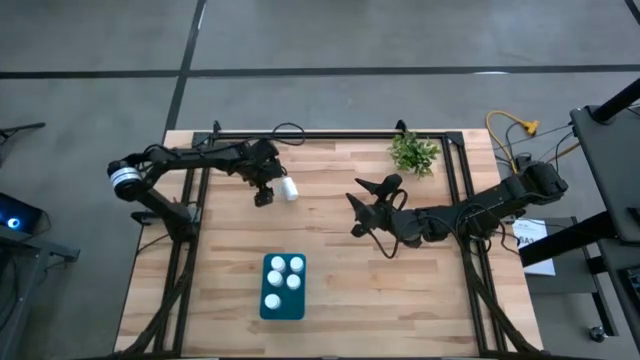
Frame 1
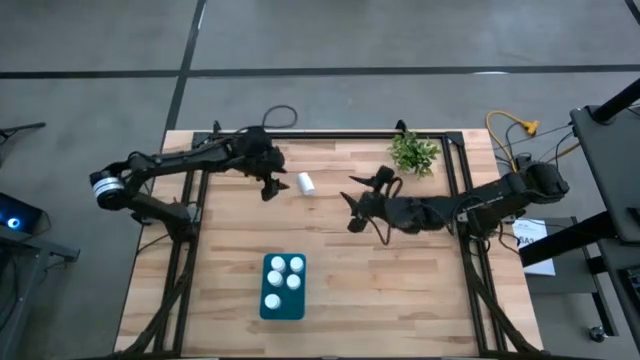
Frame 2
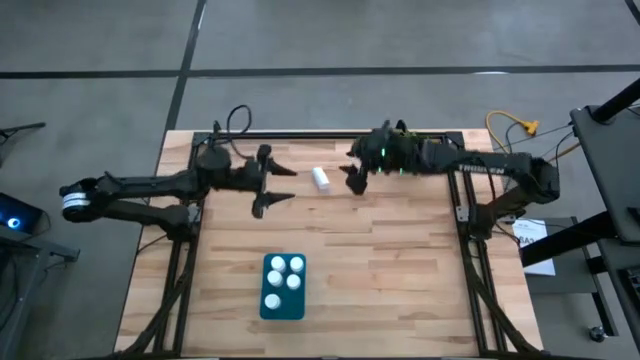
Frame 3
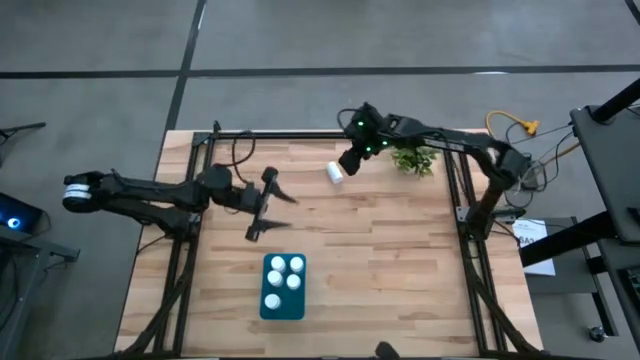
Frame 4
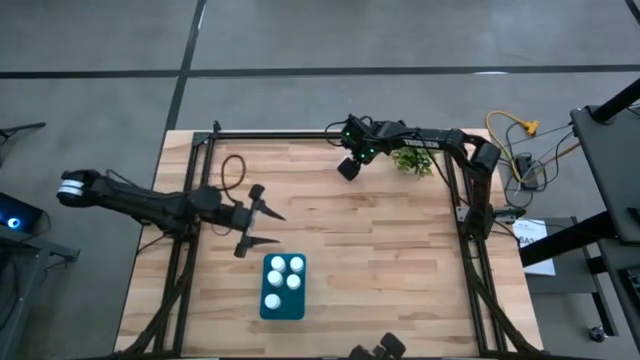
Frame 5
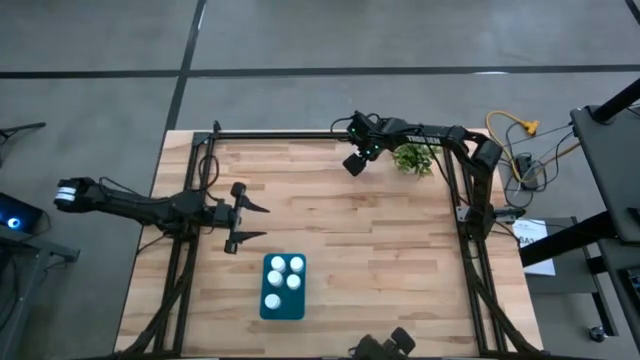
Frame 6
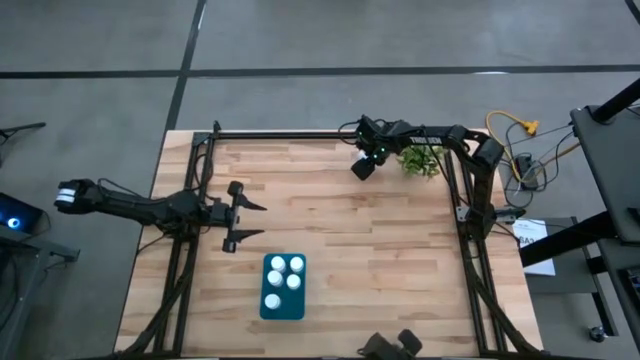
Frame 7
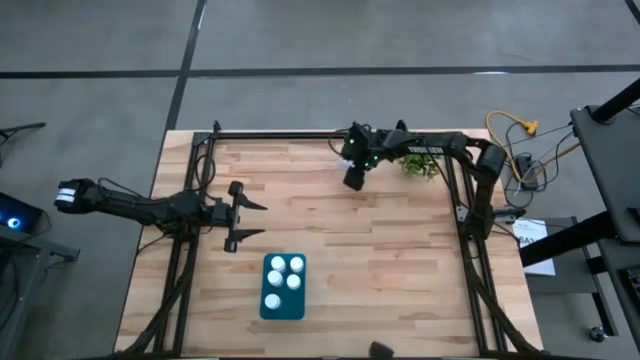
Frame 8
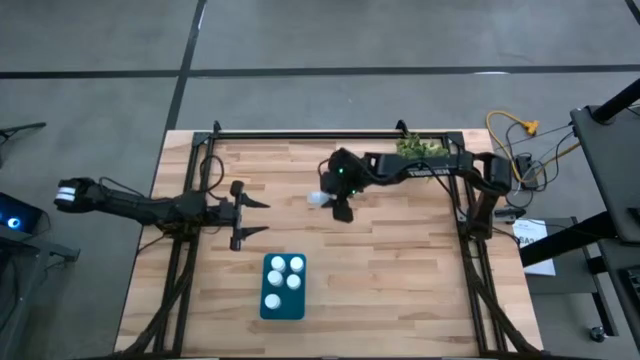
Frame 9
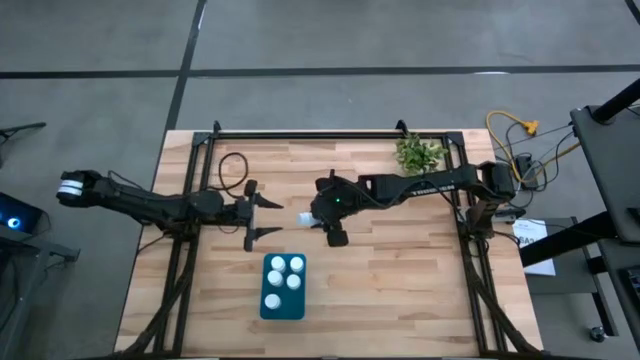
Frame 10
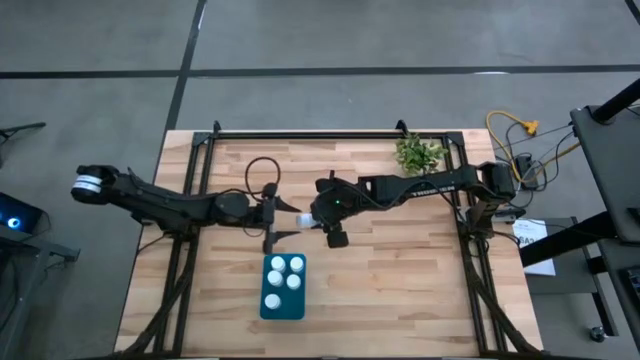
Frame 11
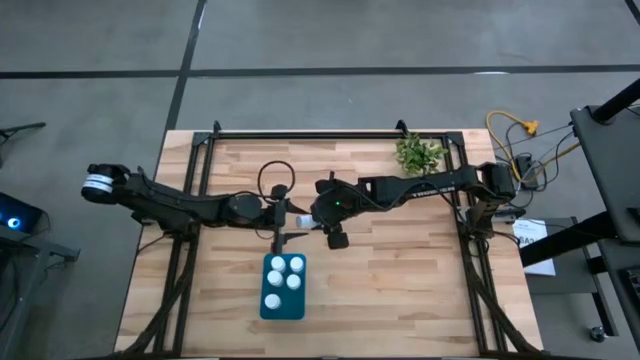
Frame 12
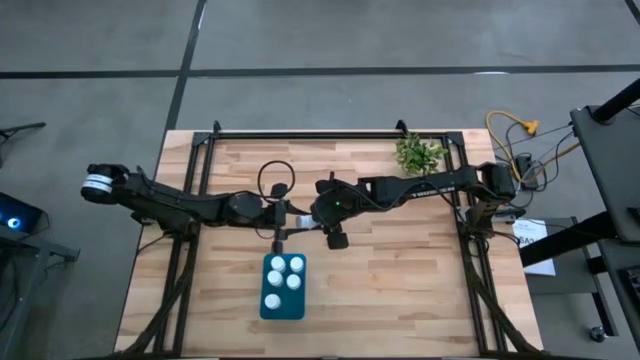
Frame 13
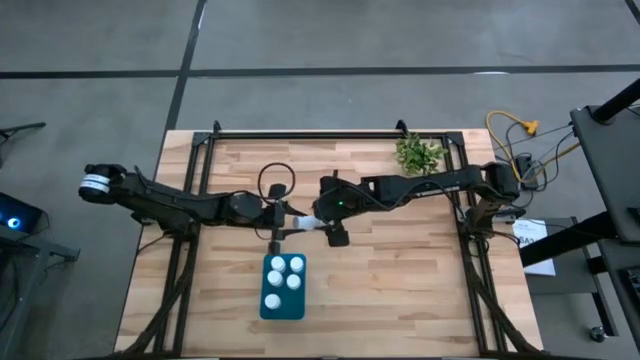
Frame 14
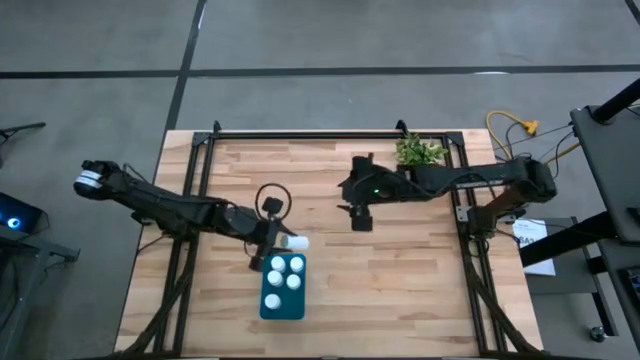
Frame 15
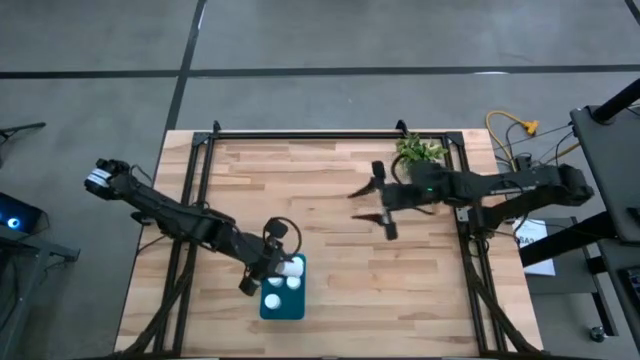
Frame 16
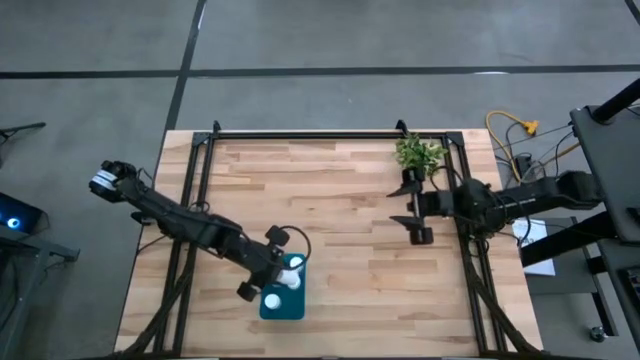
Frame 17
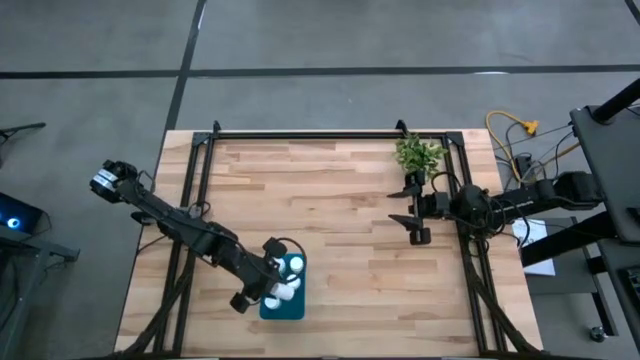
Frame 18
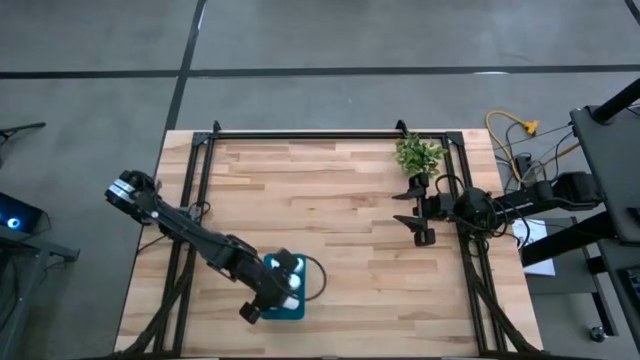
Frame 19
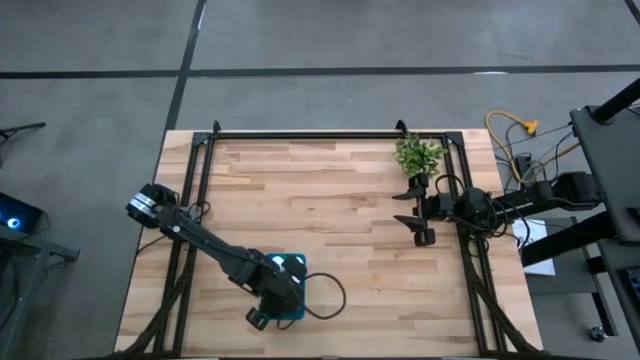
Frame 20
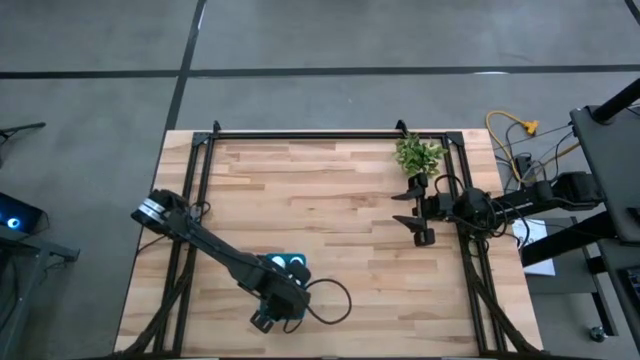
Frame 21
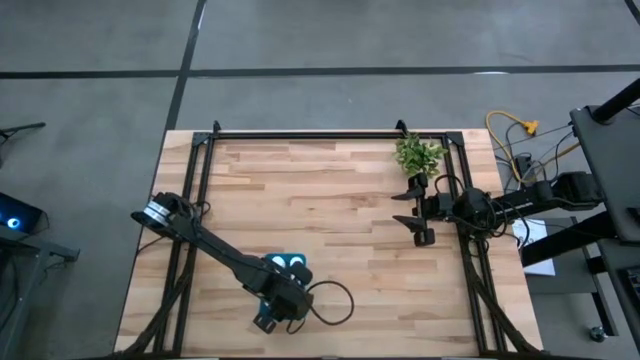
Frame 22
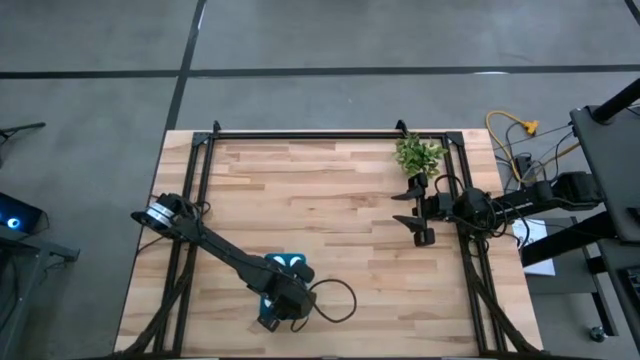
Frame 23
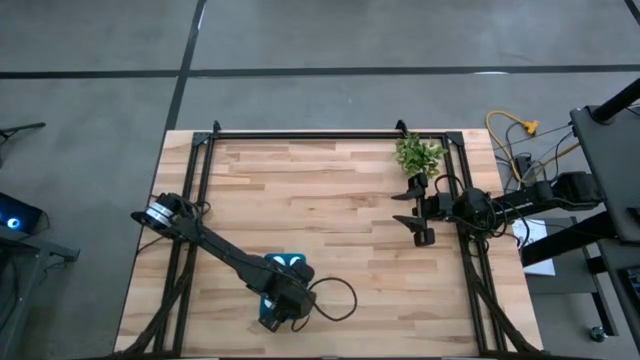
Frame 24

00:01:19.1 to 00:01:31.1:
Task: Pick and place pill bottles into a basket
Put the white pill bottle into the blue bin

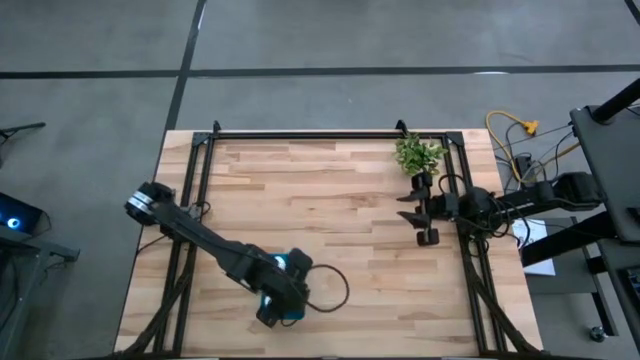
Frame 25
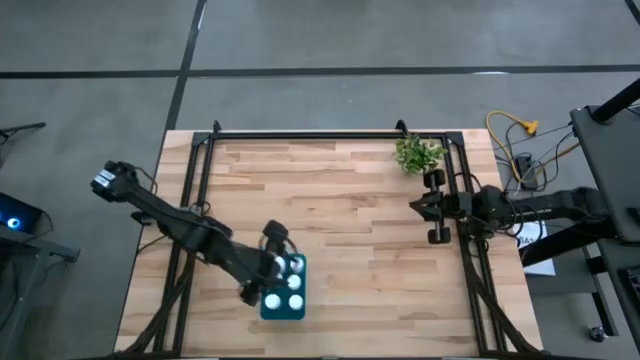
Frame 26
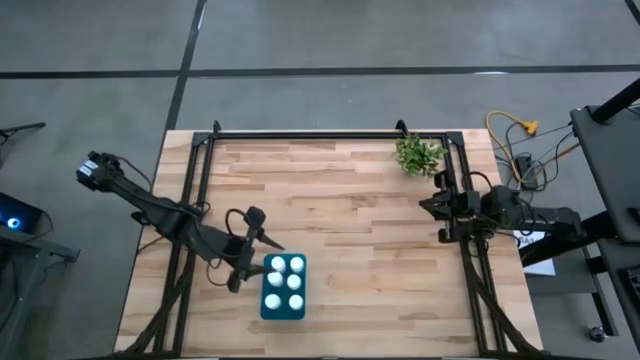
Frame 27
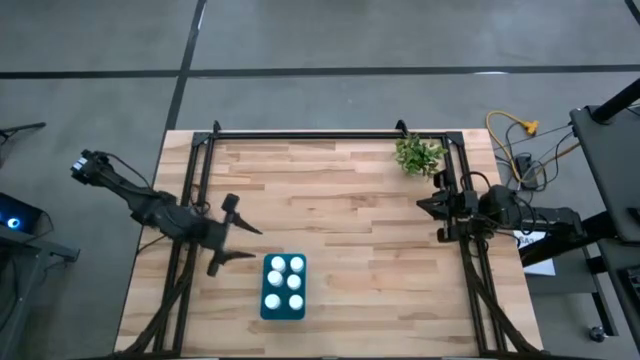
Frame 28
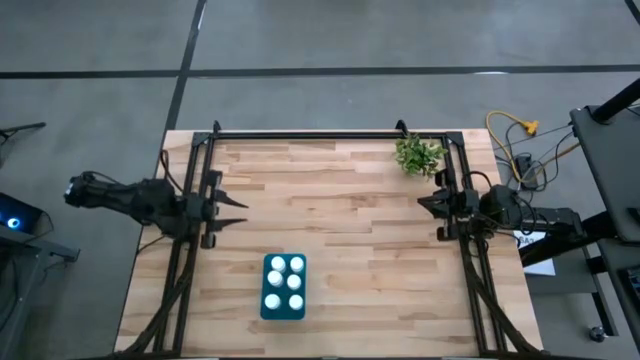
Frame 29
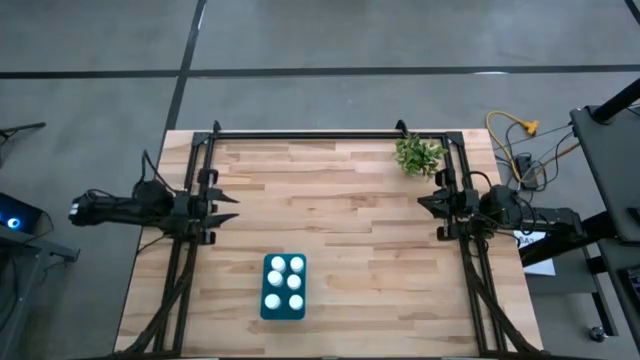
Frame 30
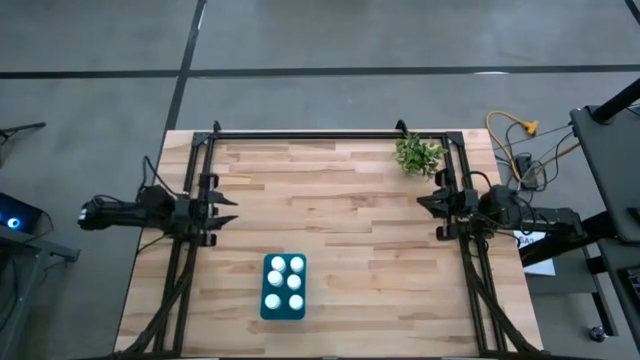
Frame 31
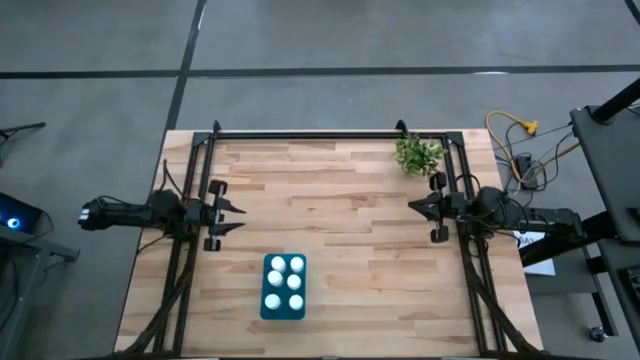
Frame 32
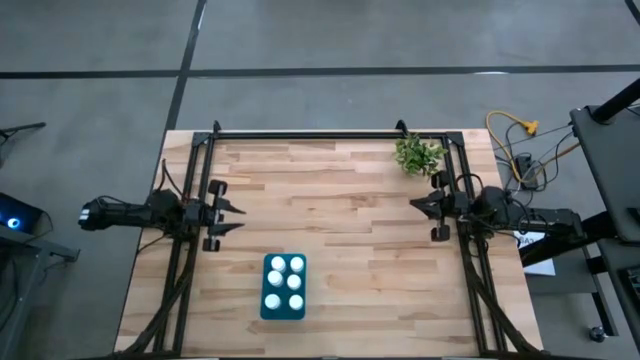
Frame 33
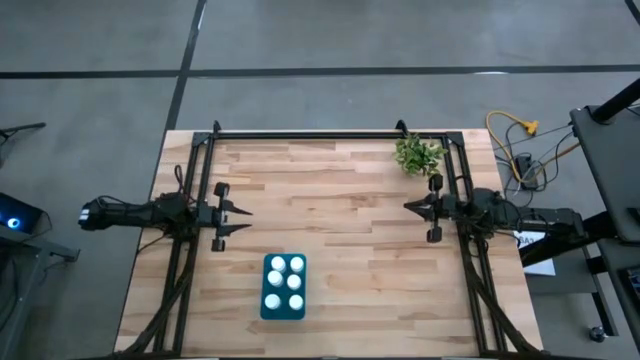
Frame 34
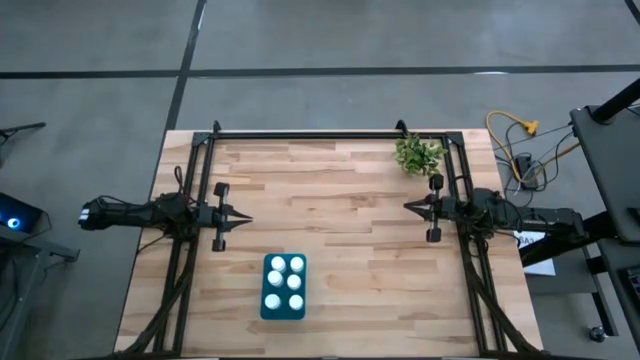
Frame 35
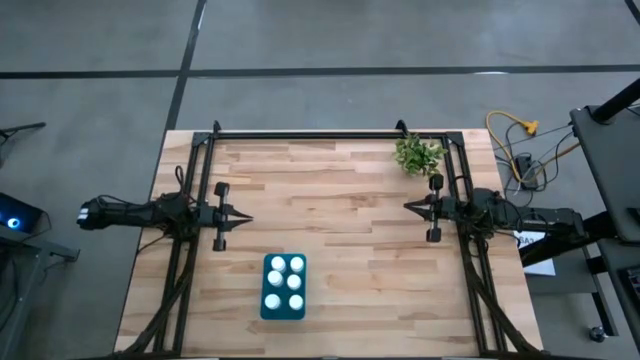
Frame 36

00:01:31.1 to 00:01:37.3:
Return to Home Position

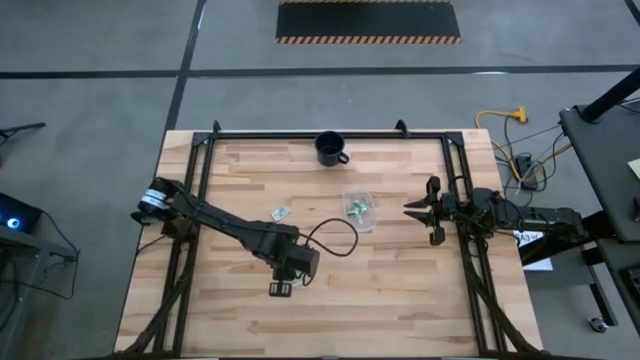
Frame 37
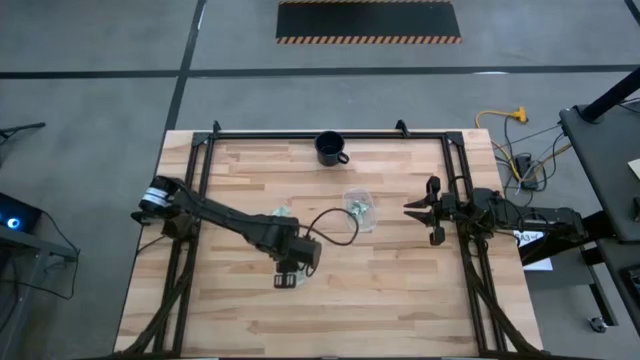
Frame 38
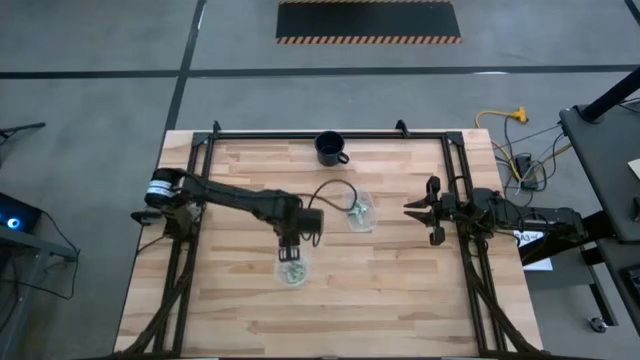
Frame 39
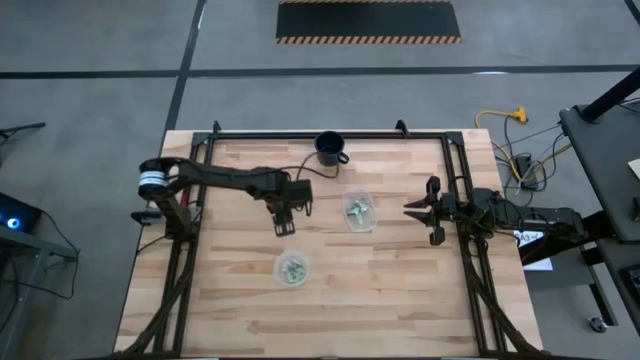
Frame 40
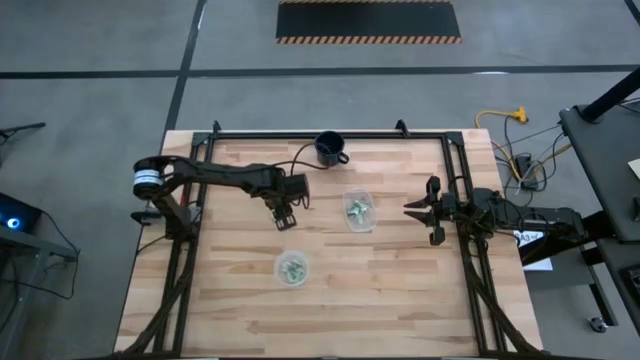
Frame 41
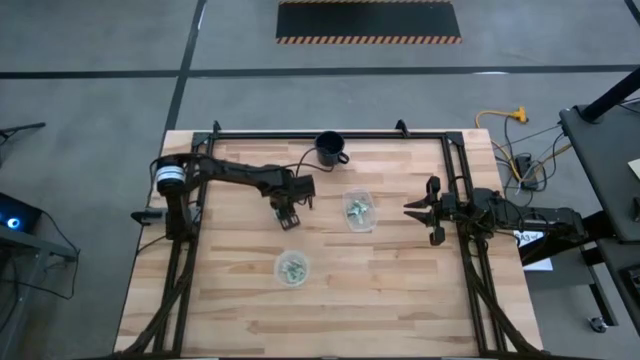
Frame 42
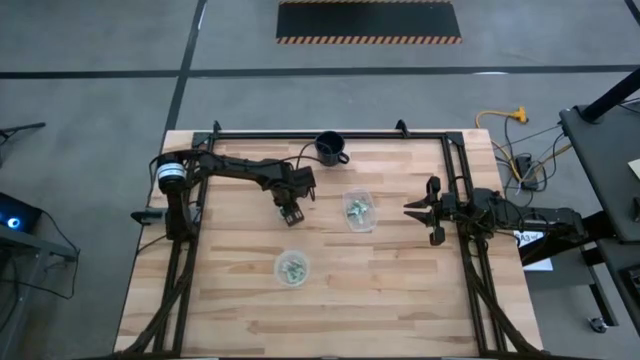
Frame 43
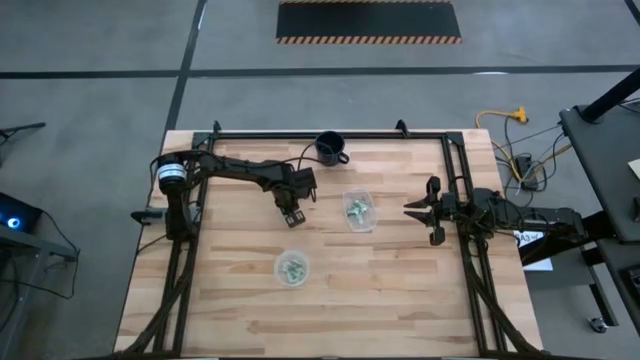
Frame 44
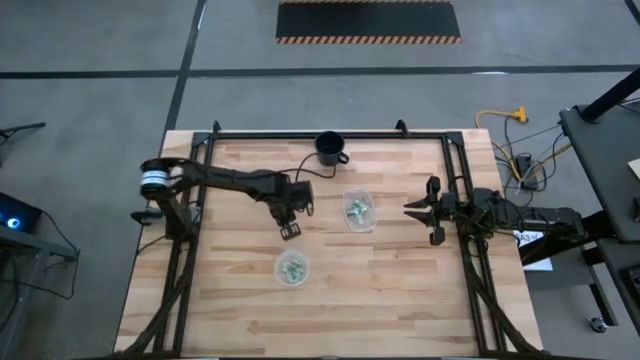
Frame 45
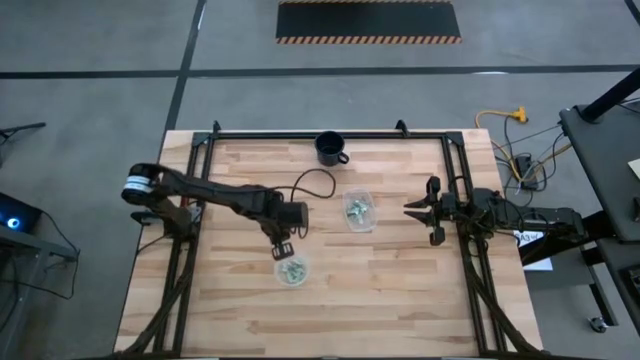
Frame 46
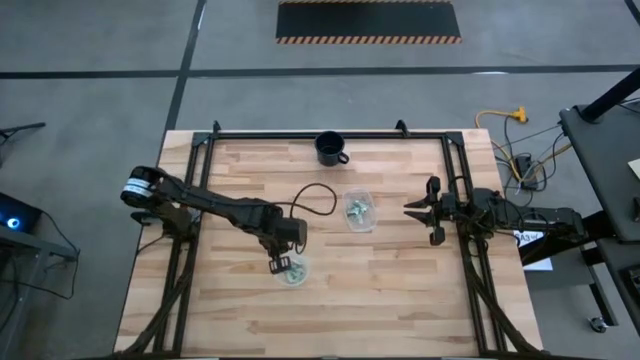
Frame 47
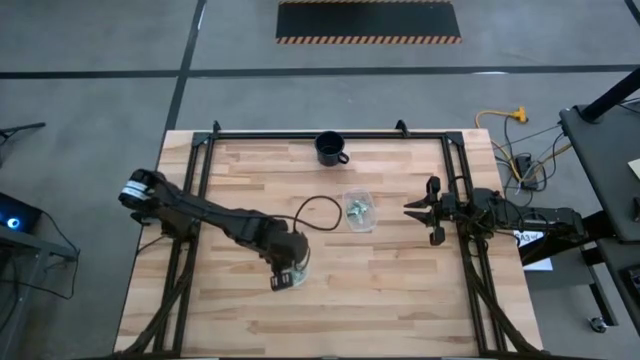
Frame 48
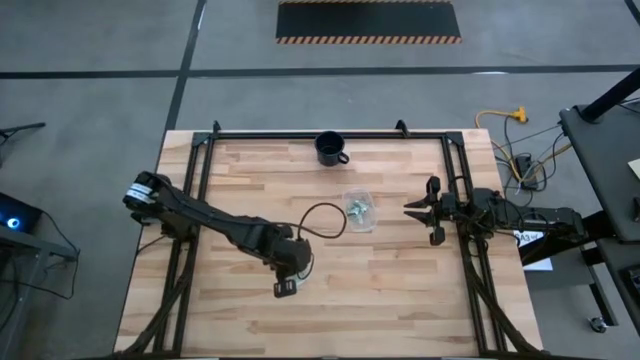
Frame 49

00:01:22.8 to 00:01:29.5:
Task: Pick and place items into bin
Put the white stevia packet into the left transparent bin
